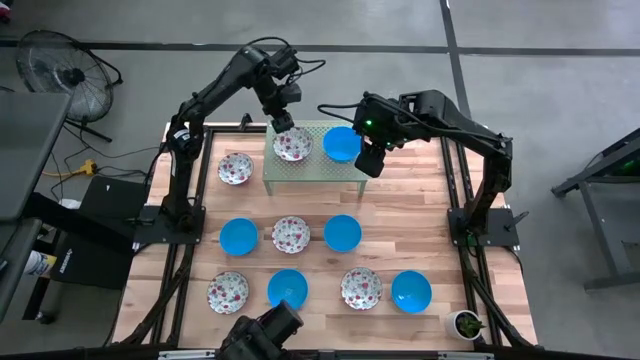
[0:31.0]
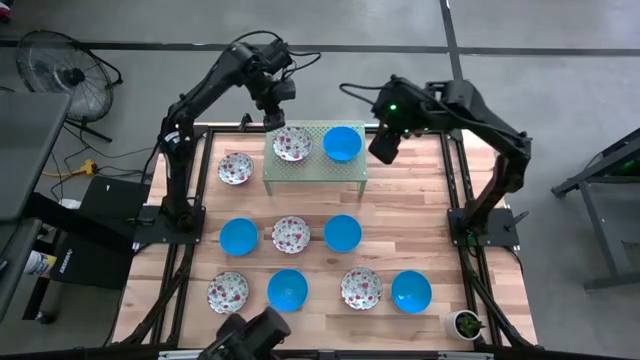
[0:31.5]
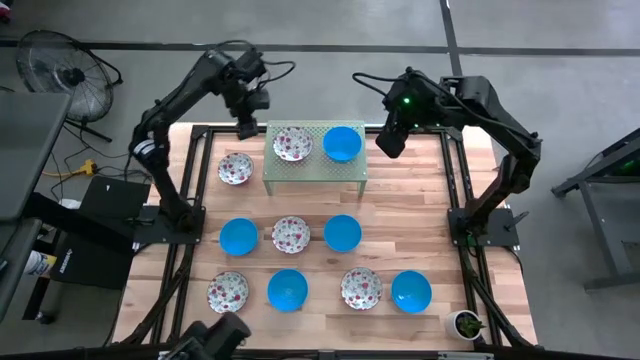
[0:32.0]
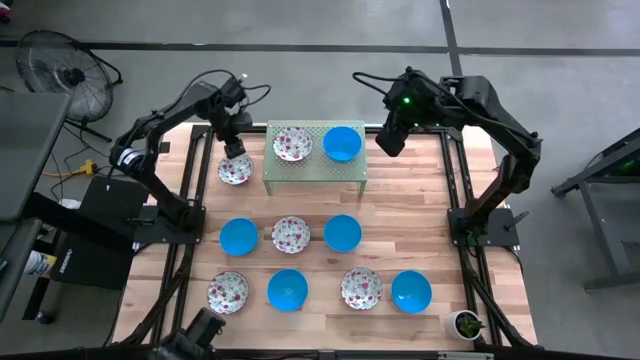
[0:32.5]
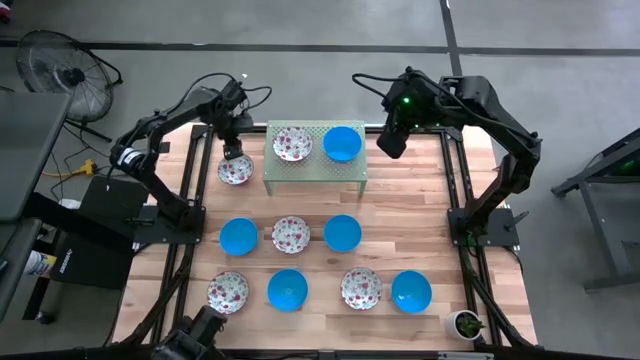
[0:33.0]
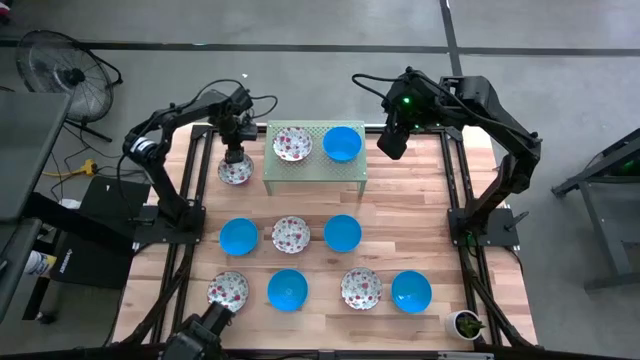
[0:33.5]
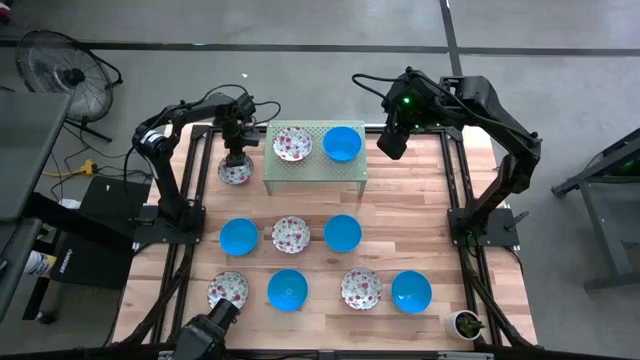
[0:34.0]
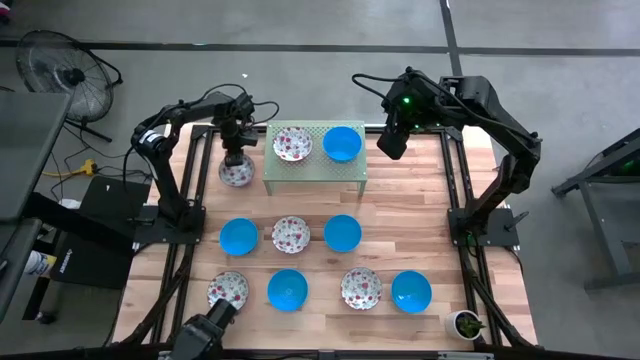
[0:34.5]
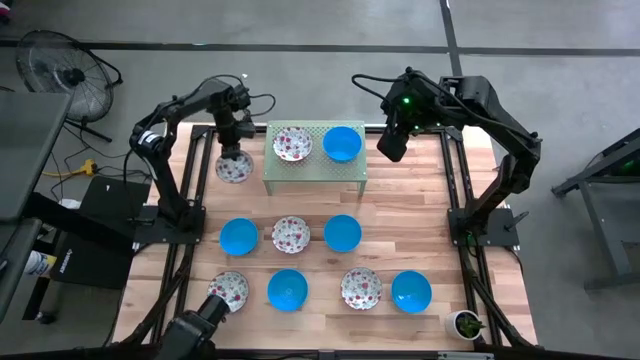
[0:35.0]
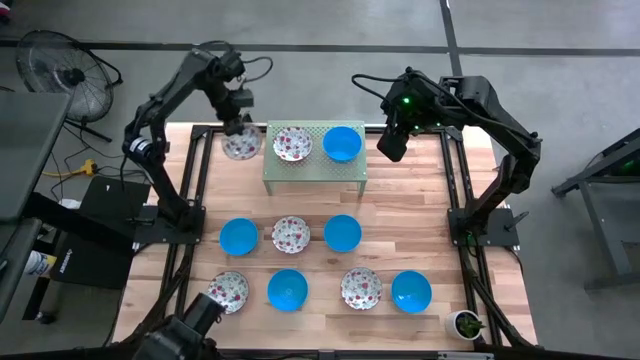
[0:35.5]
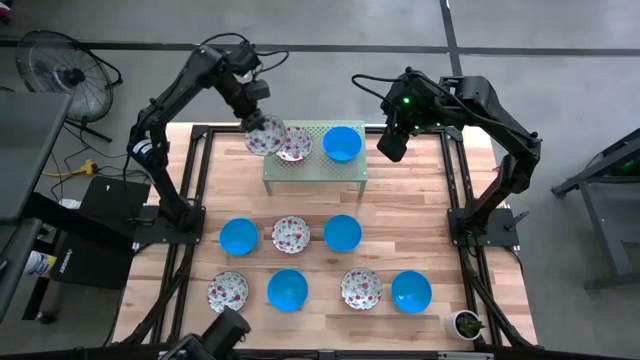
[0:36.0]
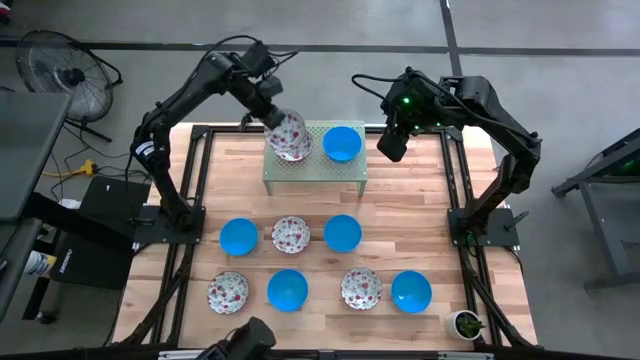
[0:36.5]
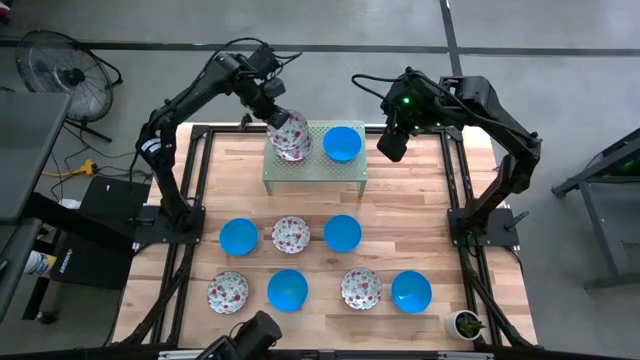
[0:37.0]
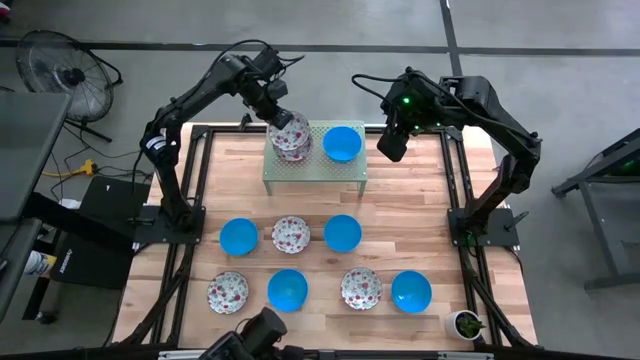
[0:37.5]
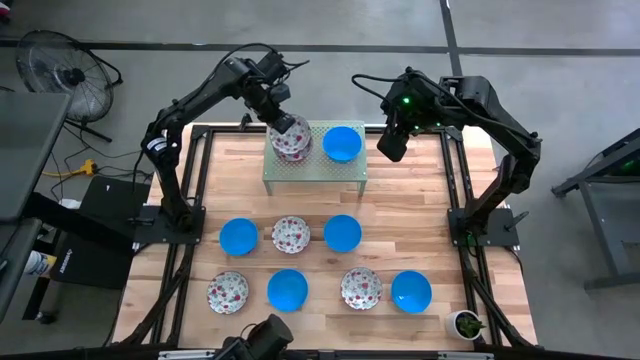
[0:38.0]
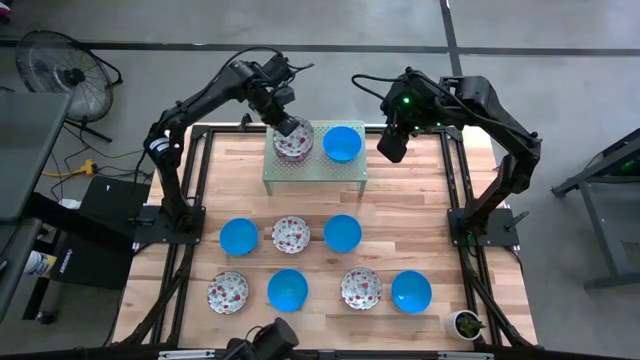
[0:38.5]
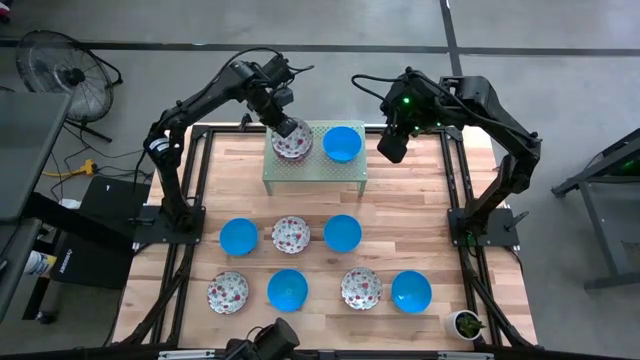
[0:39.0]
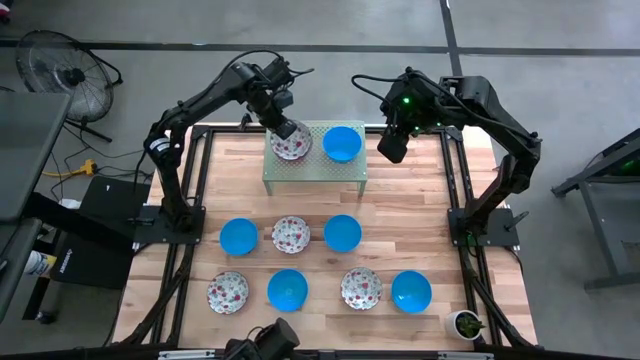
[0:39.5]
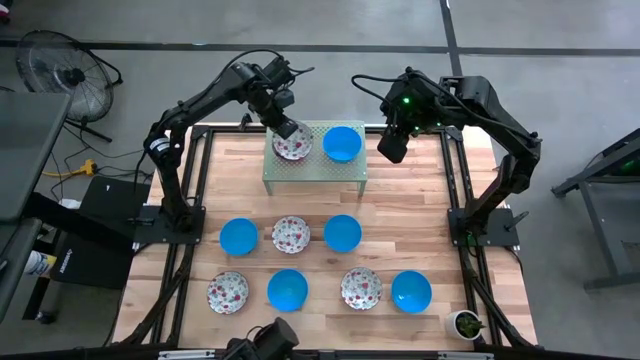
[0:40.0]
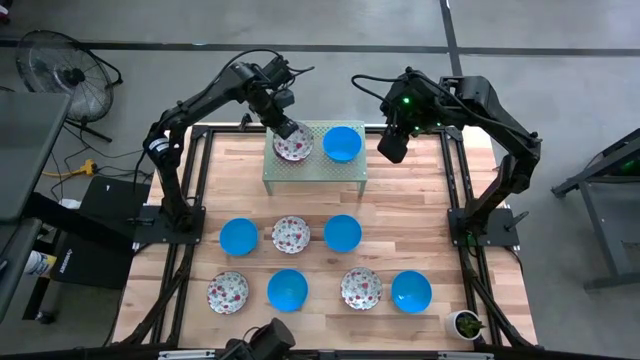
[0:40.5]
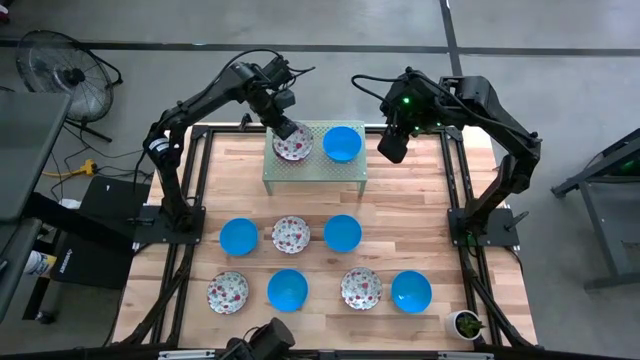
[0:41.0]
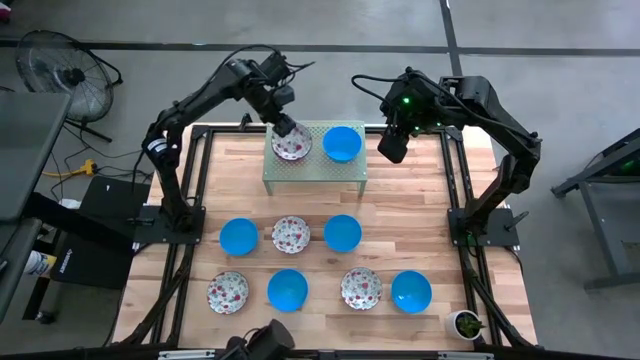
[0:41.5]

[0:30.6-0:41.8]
Task: Pick & Place Mini bowls
Stack the white and red bowl on top of the other white and red bowl on the shelf

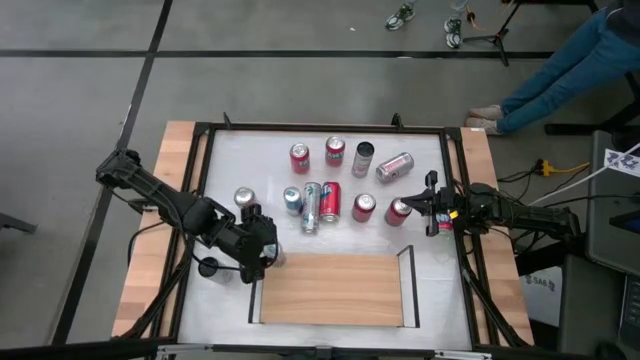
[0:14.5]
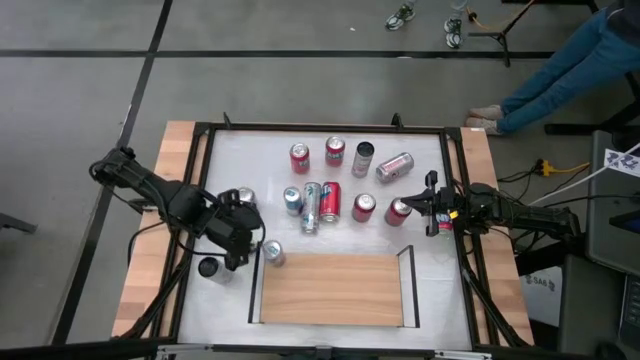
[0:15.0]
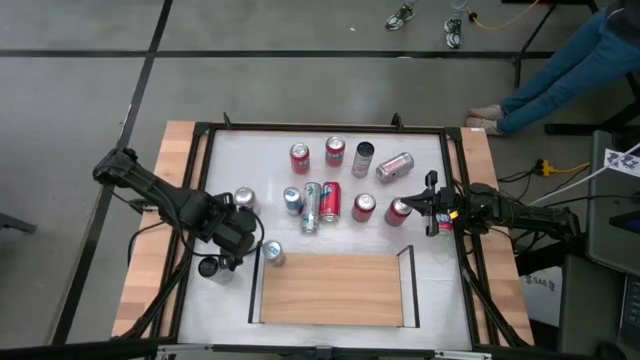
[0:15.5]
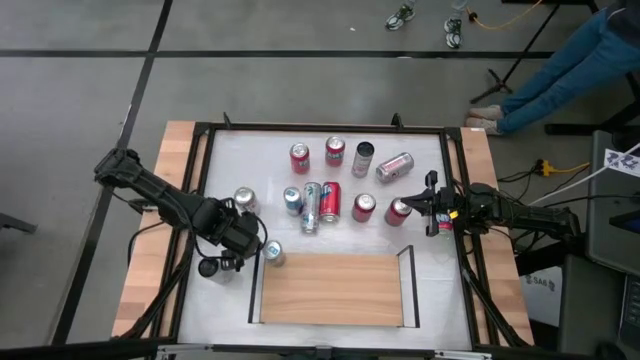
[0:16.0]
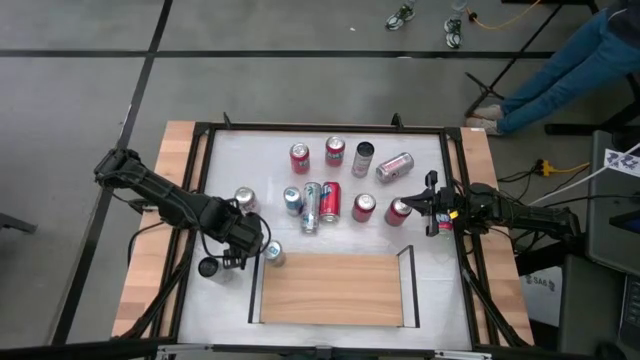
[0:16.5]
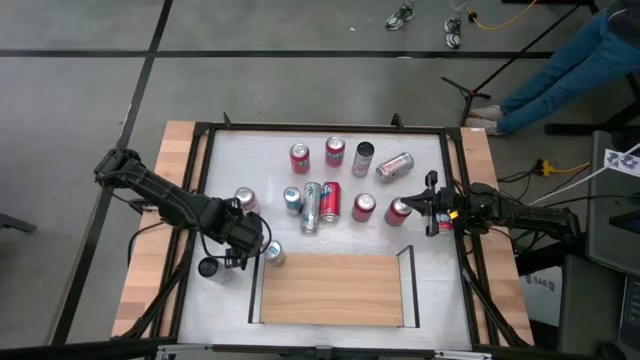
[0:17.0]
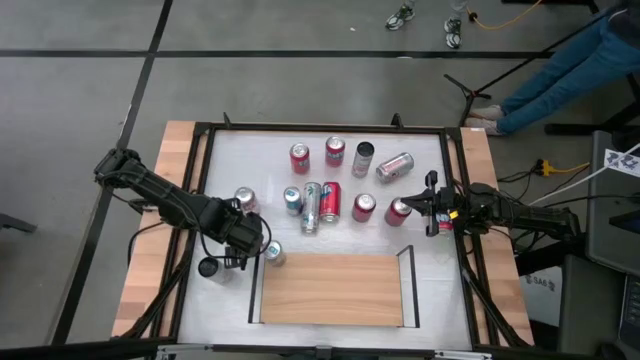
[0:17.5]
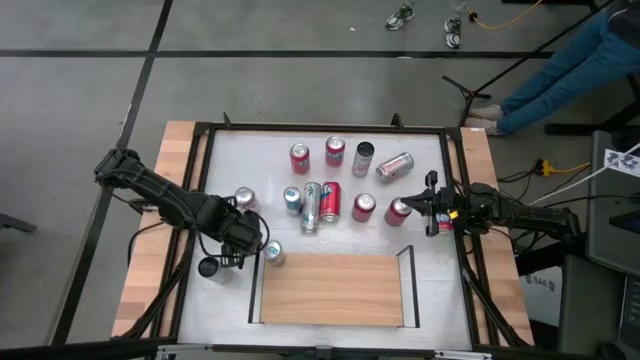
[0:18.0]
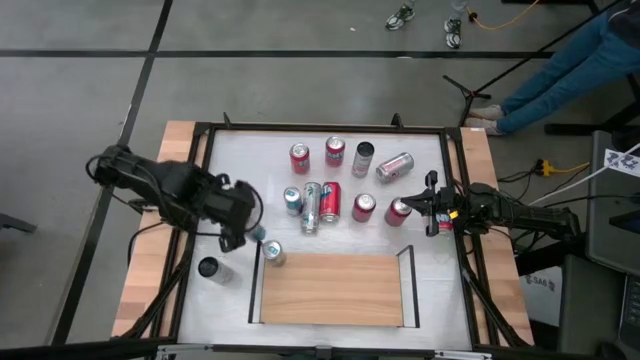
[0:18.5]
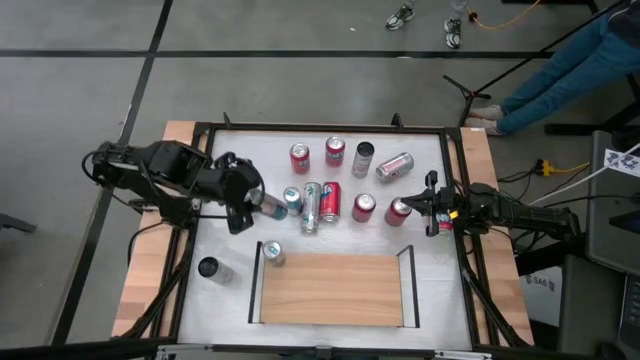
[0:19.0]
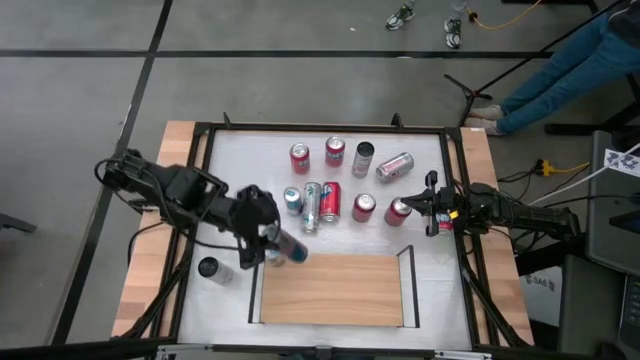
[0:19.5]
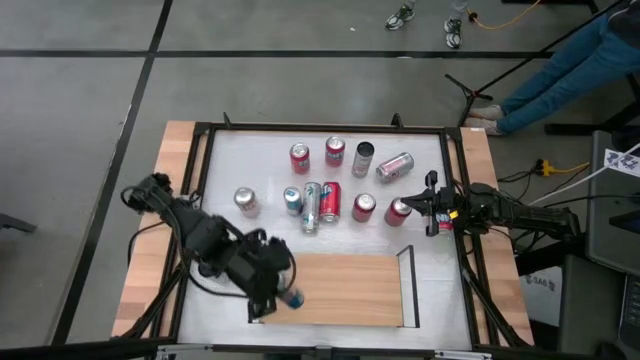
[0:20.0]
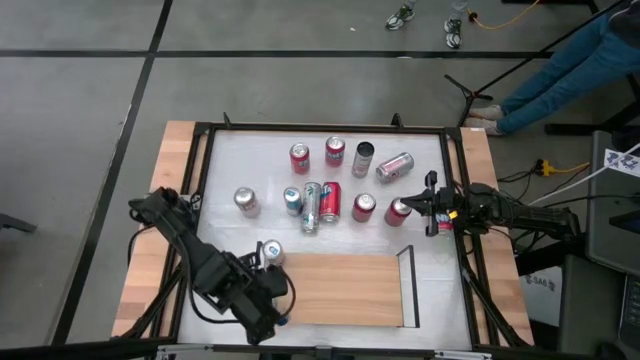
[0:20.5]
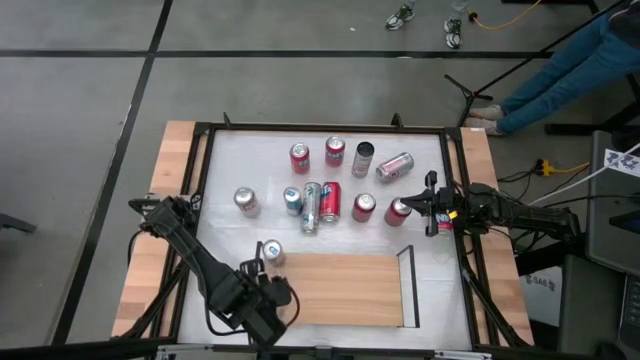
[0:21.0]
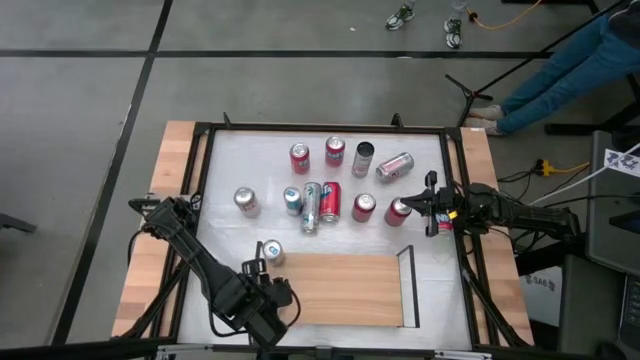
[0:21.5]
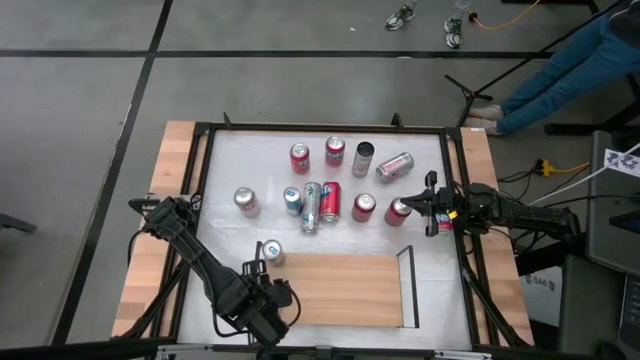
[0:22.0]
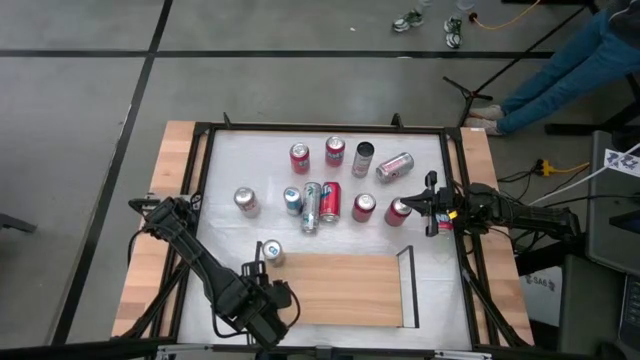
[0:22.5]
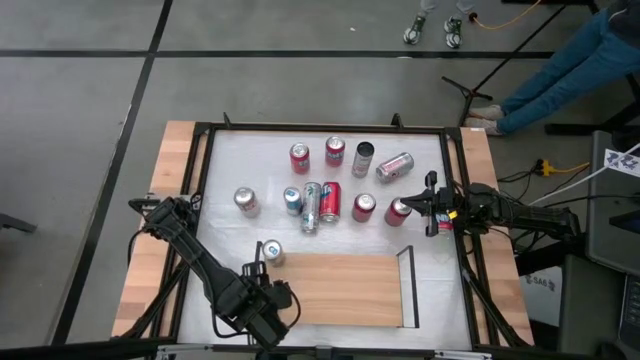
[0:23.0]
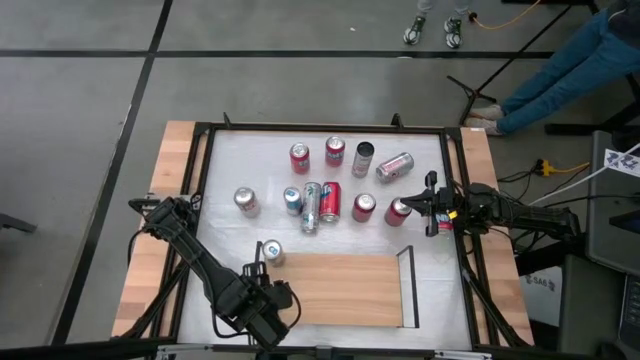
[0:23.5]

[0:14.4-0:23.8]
Task: Place canned beverage on shelf
Put the left blue soda can on the shelf aligned with the other blue soda can
